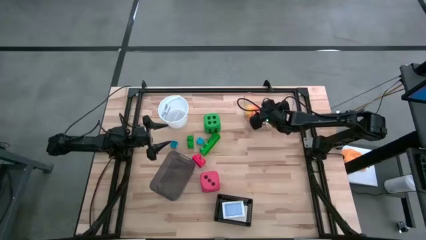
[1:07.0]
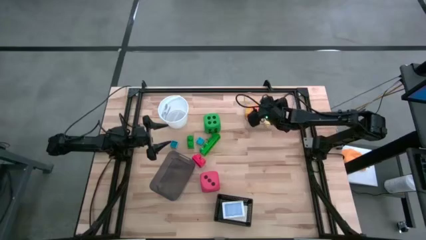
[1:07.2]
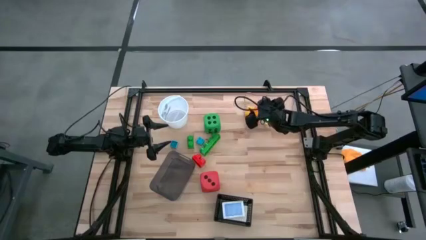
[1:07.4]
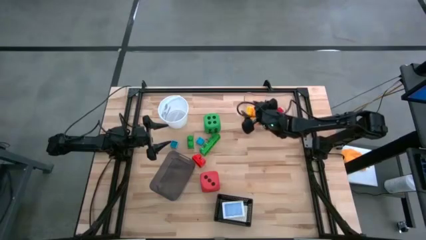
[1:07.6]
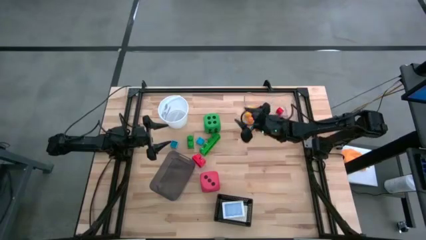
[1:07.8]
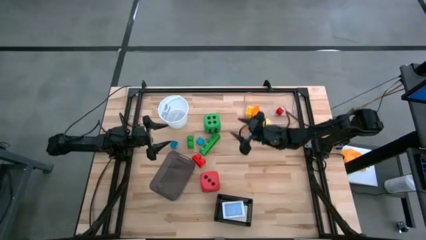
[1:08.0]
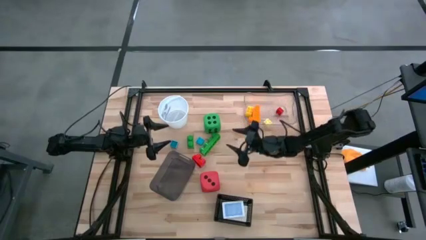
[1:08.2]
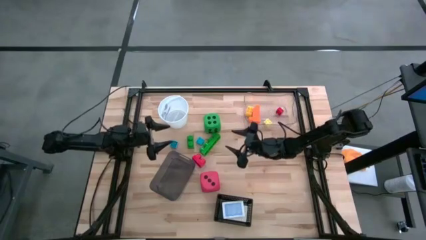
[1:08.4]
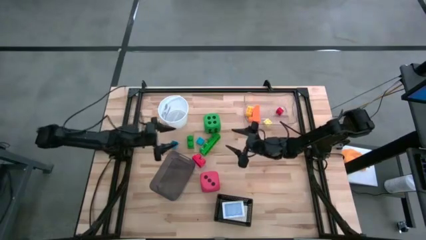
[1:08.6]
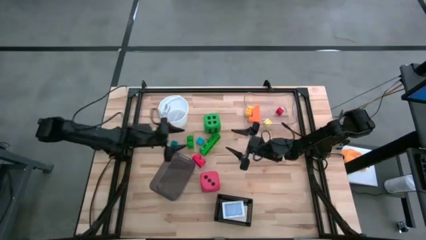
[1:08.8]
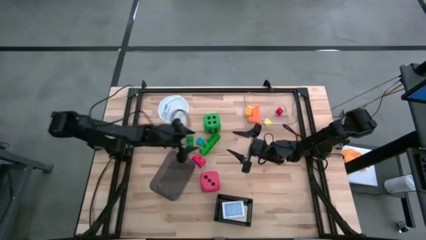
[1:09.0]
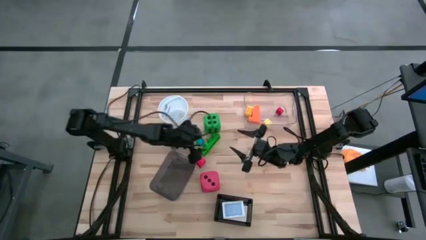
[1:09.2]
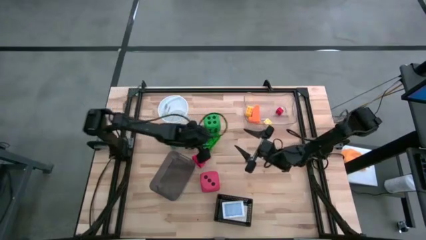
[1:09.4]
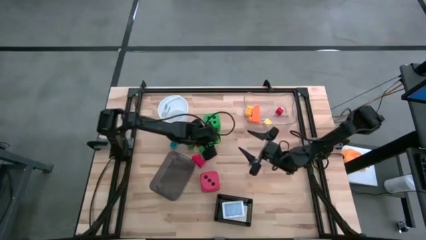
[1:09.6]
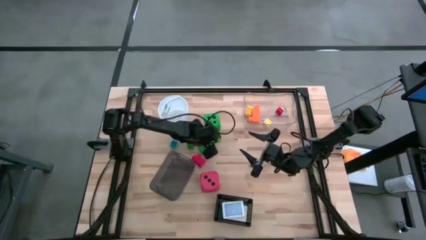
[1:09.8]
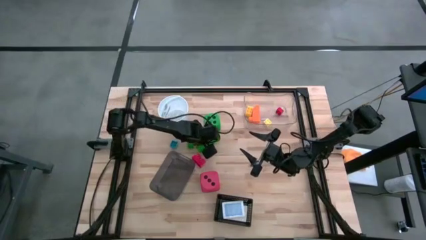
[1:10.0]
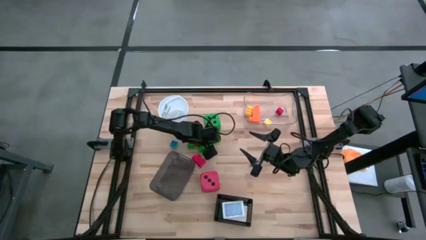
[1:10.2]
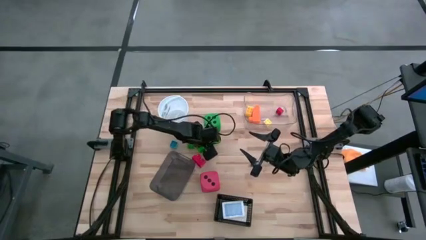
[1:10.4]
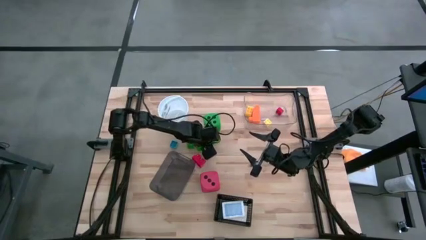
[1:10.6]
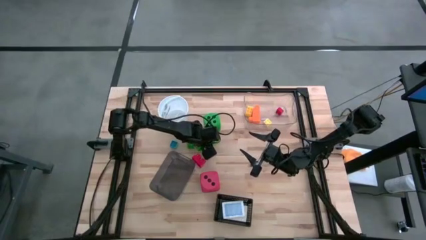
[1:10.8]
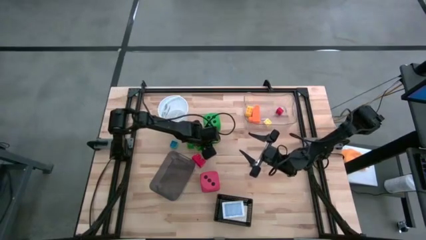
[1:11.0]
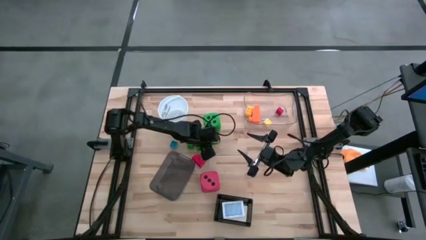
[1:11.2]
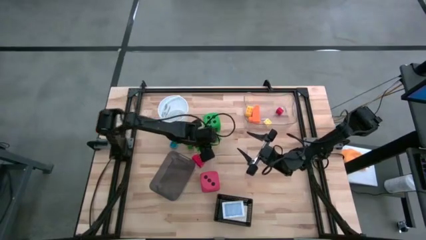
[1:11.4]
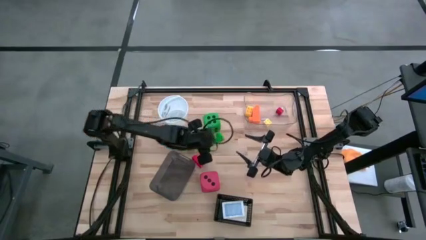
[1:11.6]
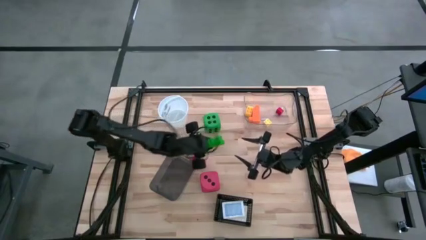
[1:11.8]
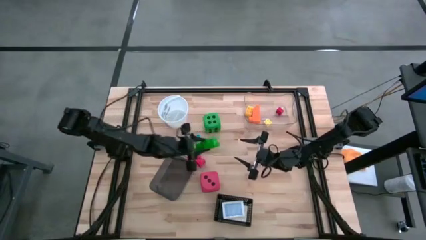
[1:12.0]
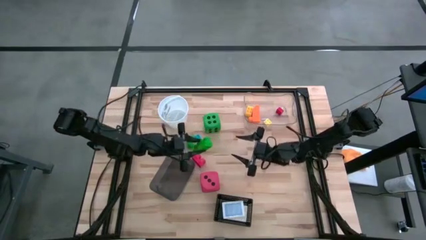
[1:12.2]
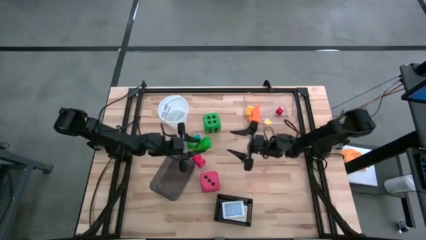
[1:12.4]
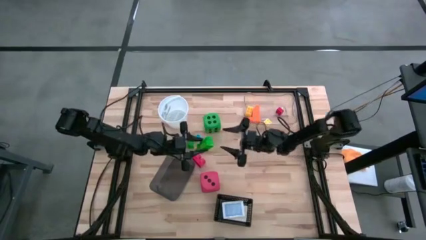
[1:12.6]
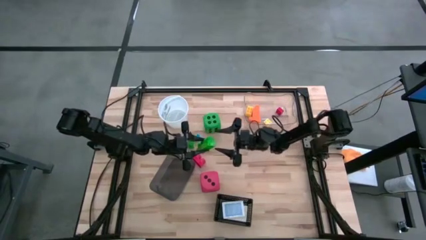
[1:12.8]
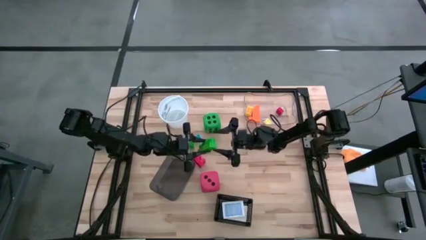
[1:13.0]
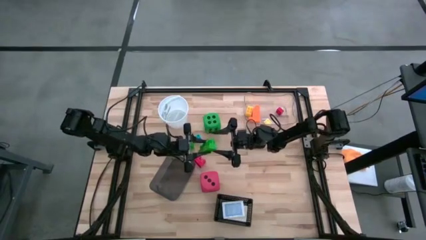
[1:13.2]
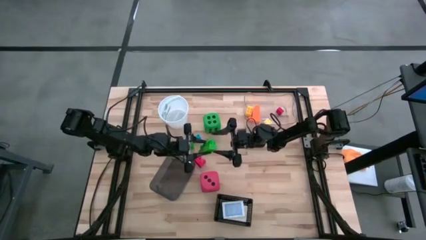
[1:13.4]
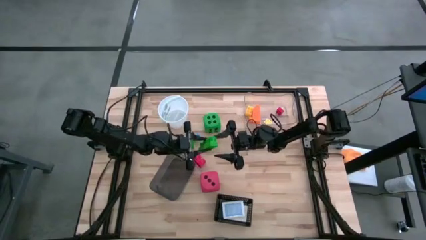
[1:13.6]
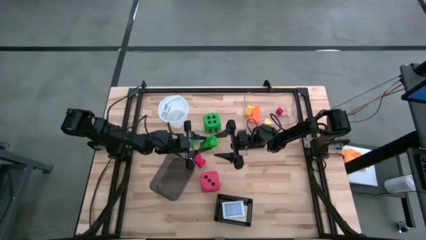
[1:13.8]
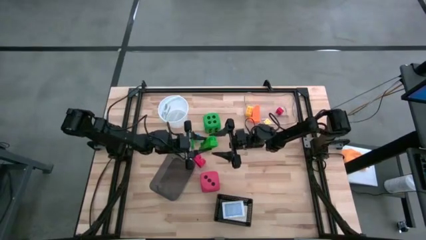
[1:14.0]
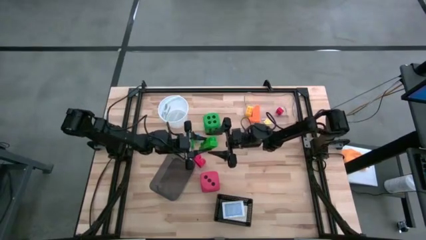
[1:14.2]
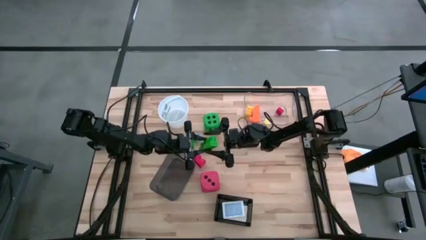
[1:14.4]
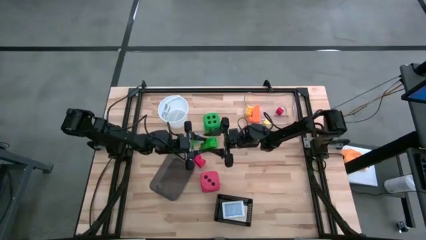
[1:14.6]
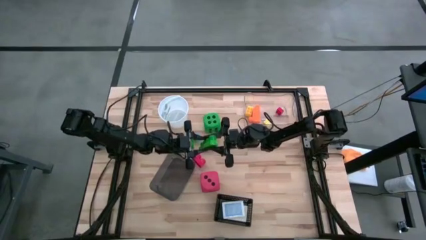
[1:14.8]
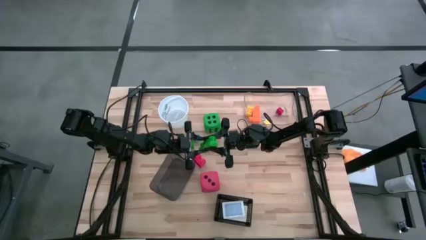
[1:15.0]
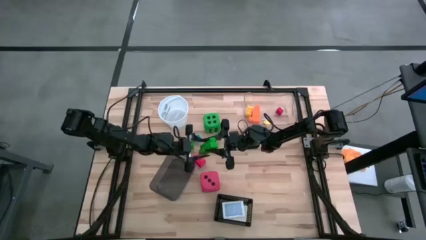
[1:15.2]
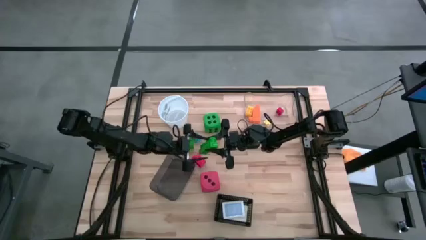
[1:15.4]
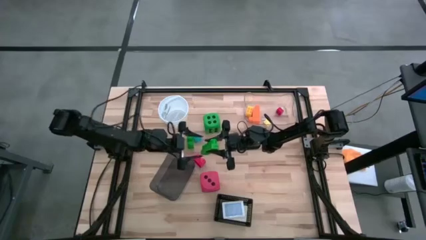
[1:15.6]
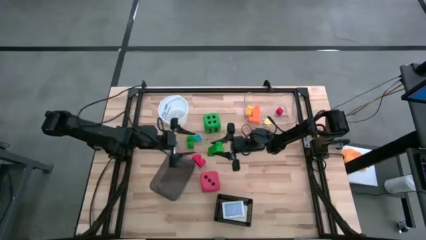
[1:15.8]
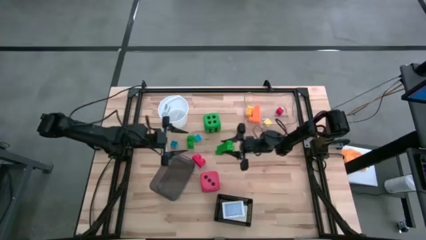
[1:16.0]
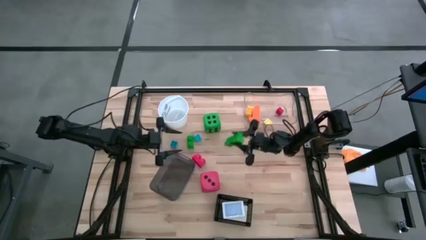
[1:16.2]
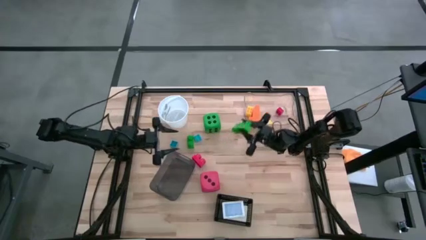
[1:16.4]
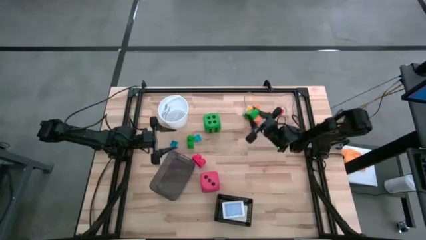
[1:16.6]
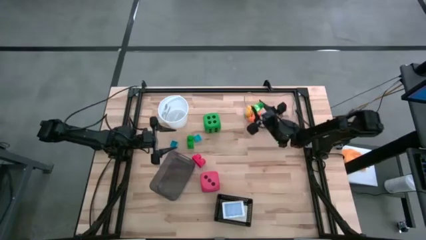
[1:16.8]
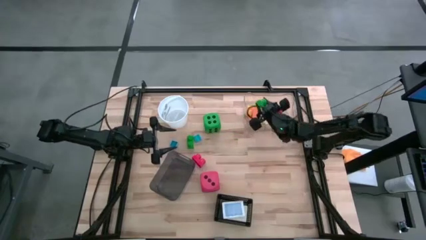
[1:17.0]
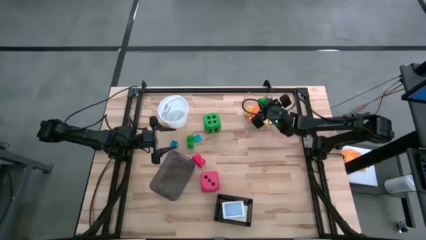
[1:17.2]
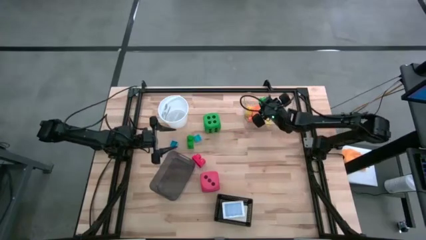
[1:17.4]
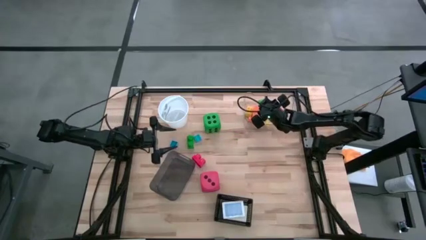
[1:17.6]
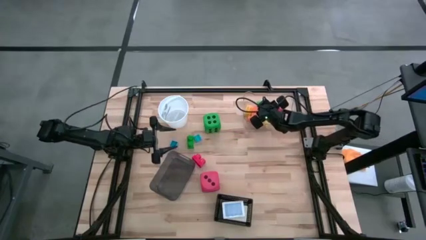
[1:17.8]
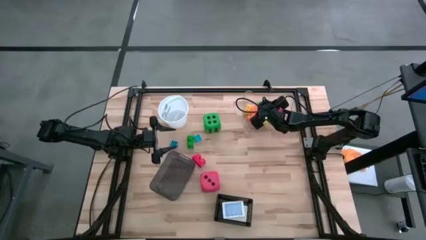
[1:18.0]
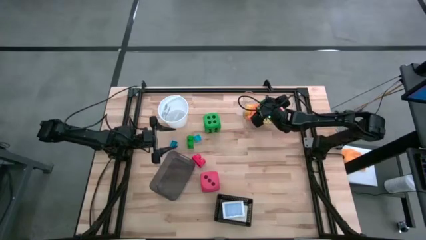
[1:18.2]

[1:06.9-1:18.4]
Task: Pick & Place Toys
Put the right green game piece into the transparent bin

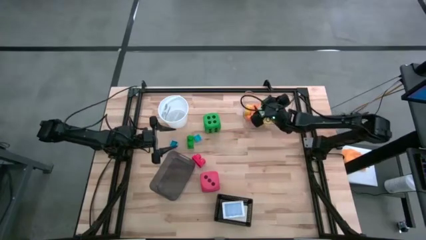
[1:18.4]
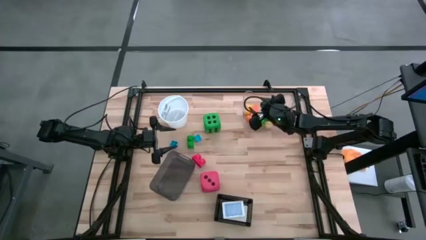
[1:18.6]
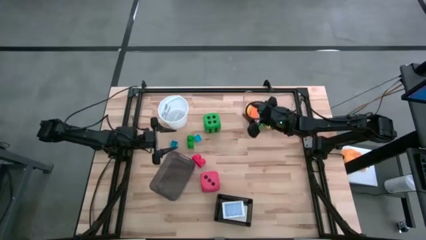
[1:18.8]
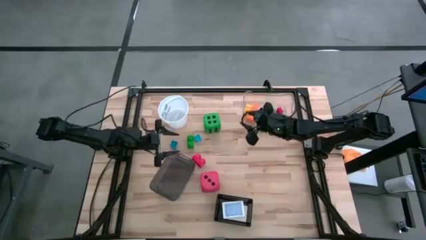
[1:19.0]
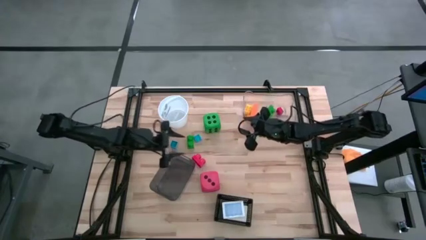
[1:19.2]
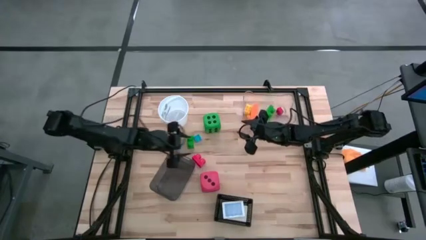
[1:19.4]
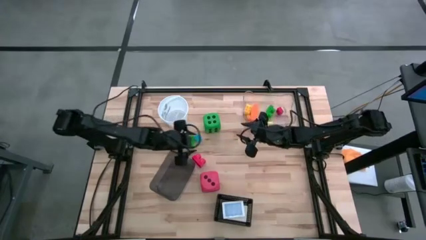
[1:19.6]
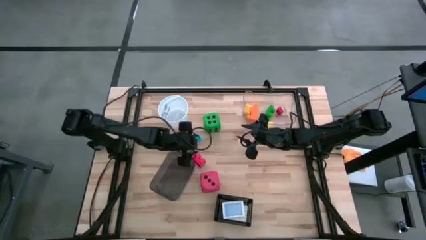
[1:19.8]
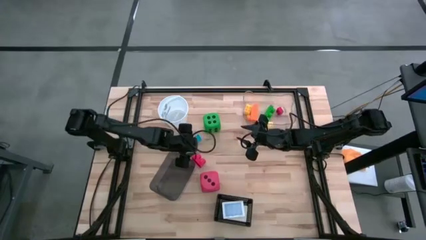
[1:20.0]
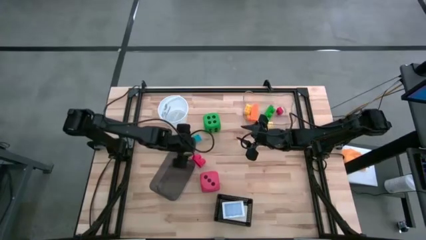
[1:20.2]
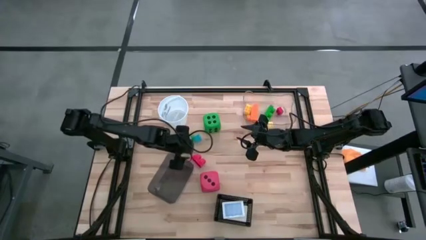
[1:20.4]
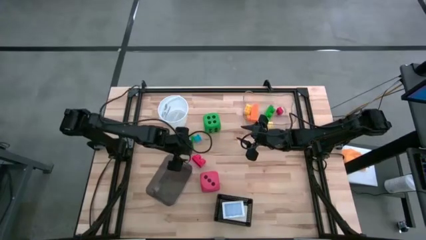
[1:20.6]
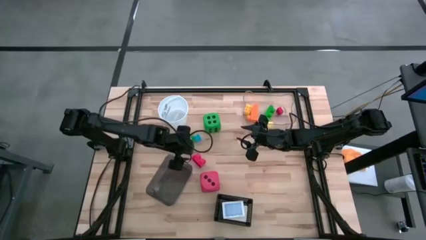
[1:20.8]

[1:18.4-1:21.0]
Adjust the gray bin on the table

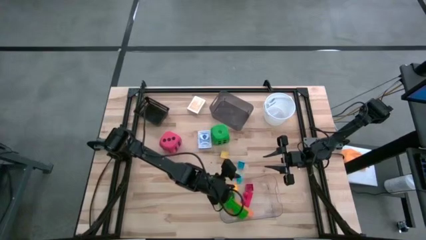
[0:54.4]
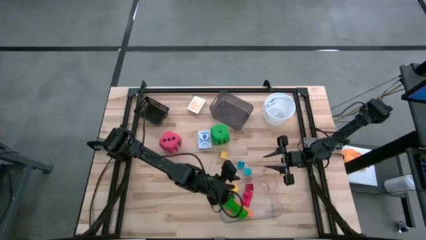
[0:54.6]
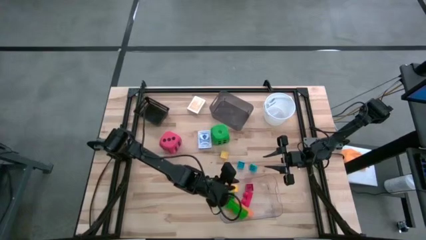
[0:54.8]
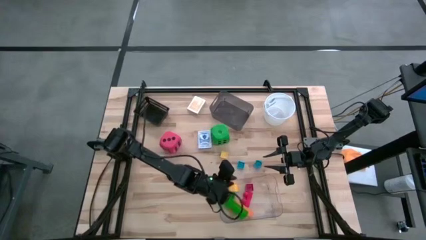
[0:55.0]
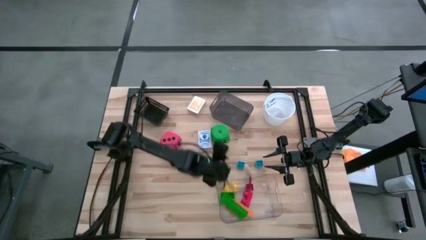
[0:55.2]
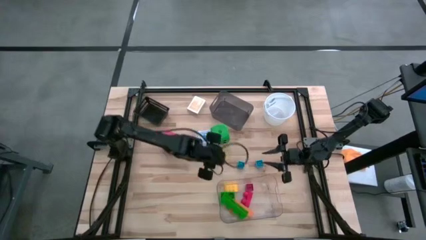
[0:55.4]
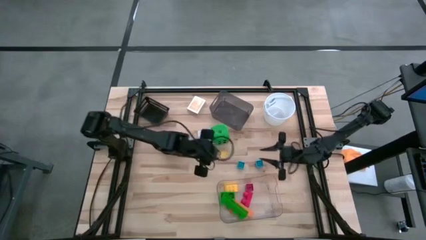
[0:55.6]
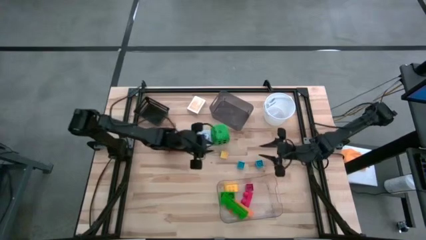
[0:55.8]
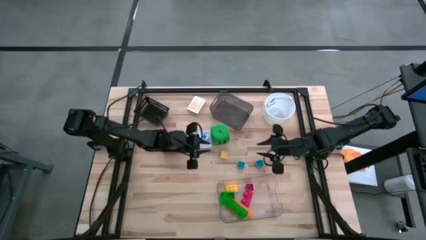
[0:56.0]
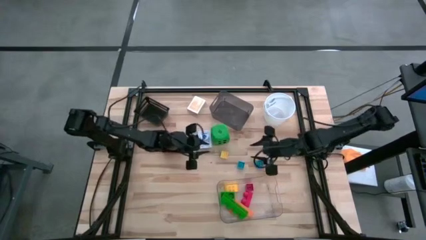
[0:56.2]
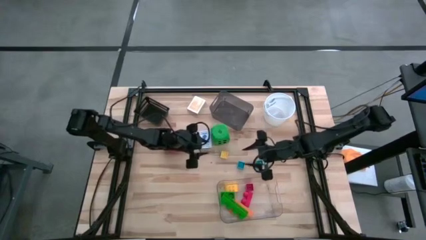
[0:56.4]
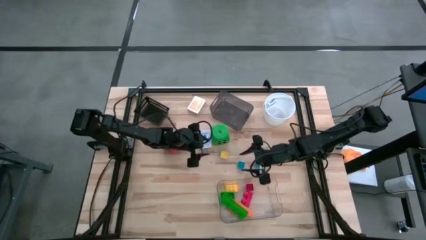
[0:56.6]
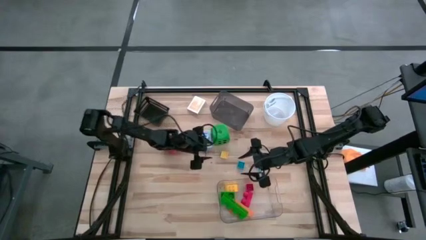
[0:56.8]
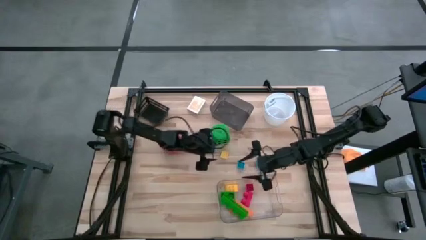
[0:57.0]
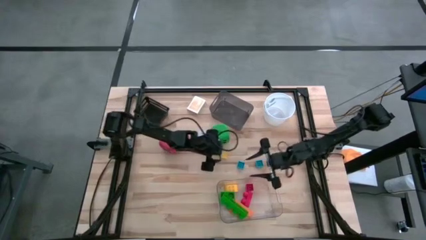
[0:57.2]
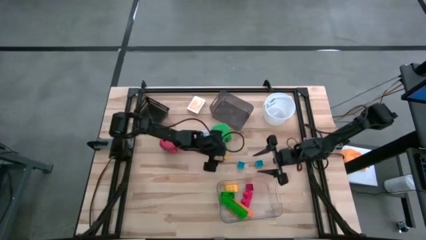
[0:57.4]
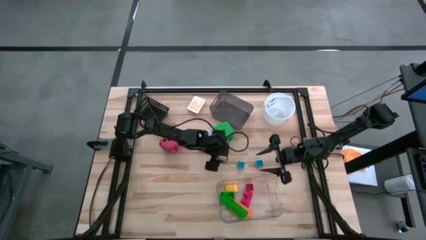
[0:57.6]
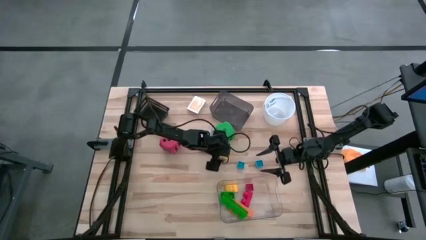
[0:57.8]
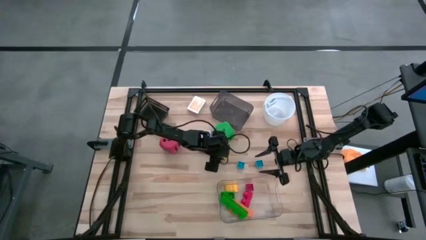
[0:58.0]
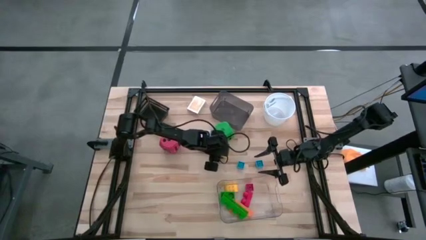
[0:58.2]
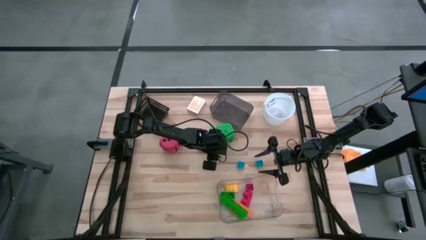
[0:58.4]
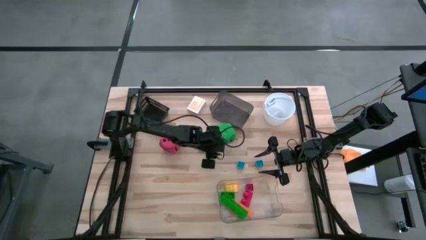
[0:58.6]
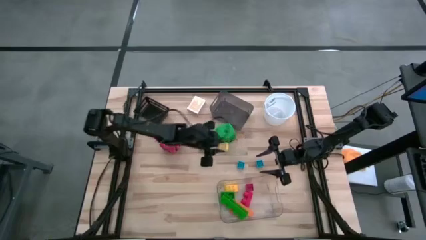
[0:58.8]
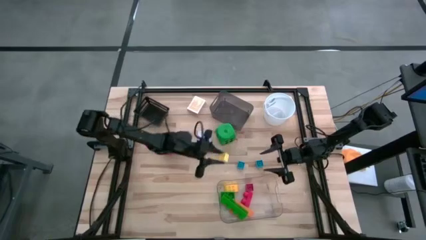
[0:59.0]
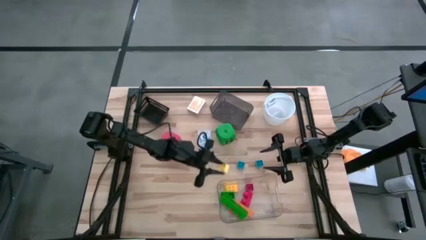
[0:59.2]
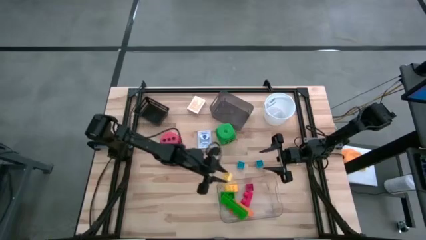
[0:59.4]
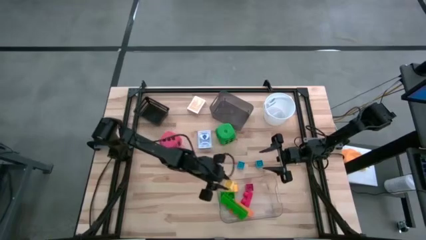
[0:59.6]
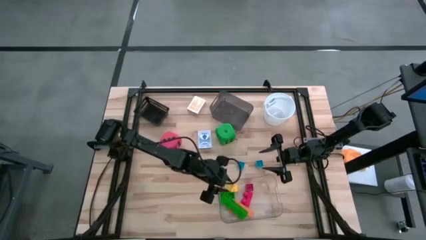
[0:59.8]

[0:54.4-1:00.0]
Task: Pick & Place Toys
Put the yellow game piece into the bottom transparent bin
